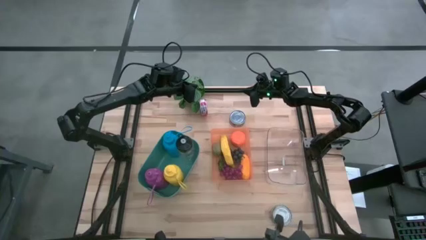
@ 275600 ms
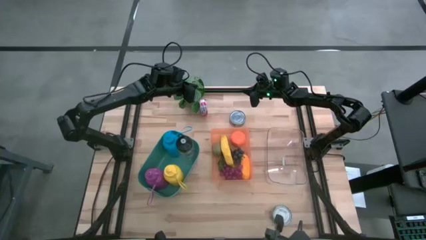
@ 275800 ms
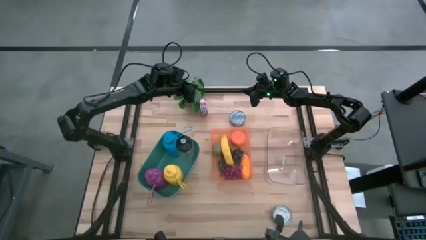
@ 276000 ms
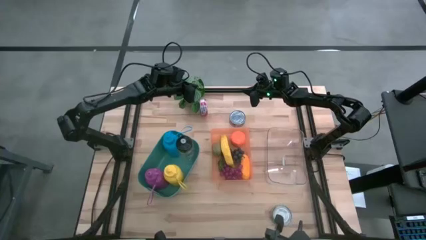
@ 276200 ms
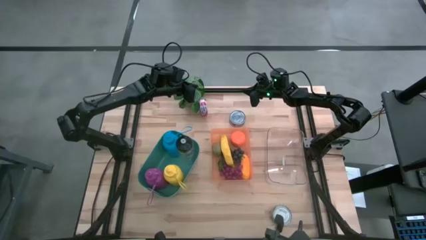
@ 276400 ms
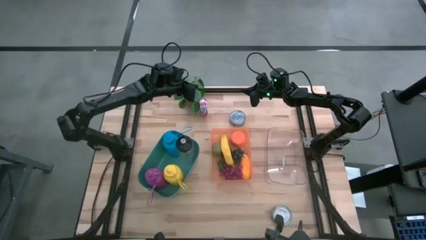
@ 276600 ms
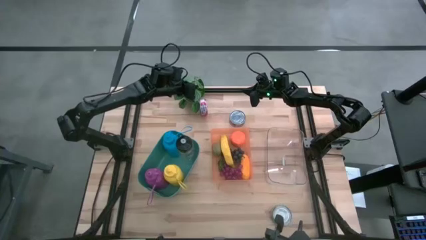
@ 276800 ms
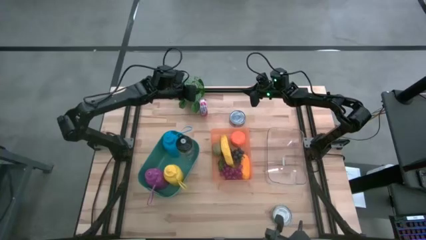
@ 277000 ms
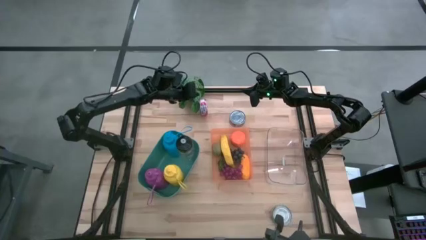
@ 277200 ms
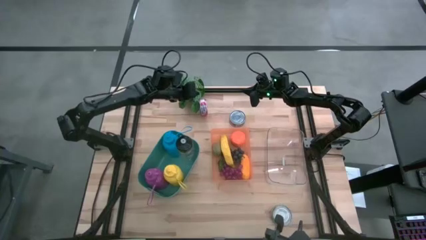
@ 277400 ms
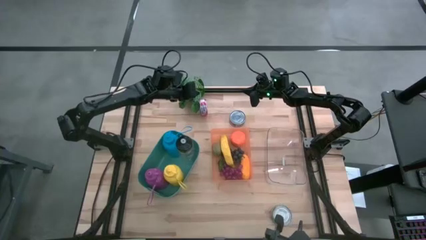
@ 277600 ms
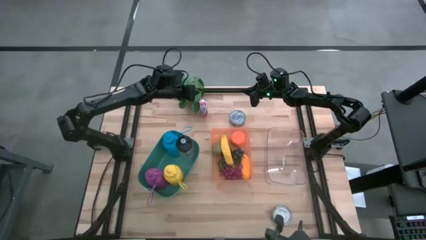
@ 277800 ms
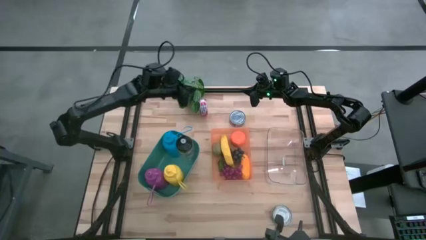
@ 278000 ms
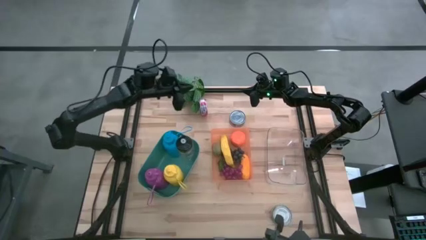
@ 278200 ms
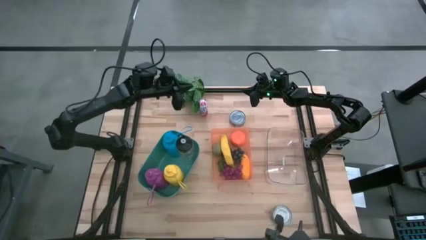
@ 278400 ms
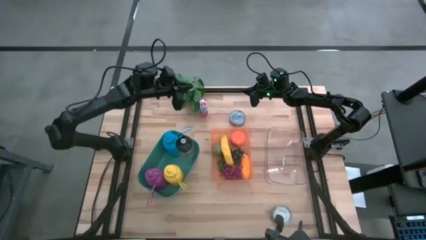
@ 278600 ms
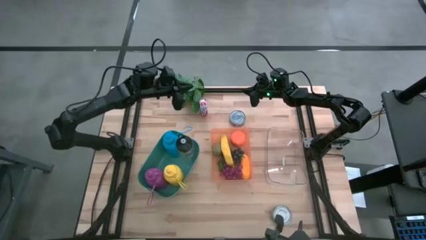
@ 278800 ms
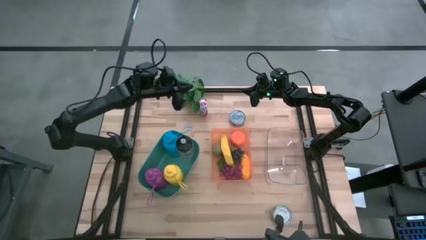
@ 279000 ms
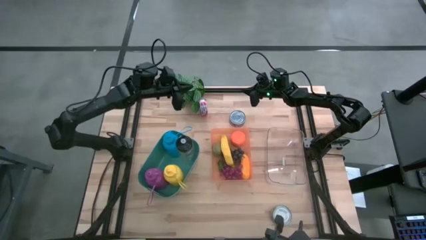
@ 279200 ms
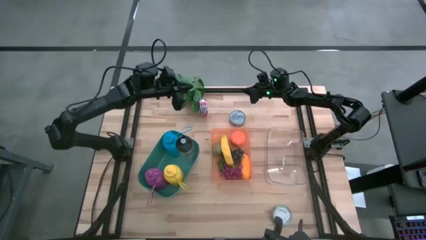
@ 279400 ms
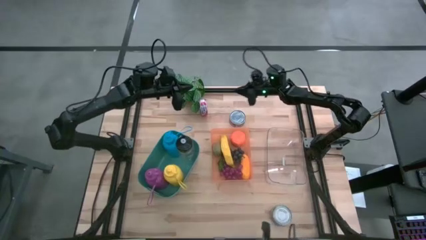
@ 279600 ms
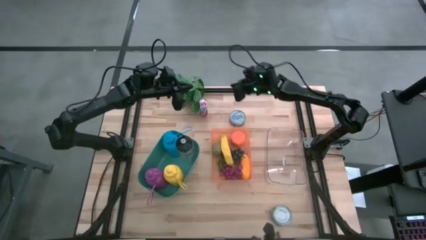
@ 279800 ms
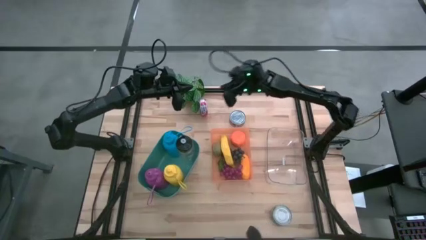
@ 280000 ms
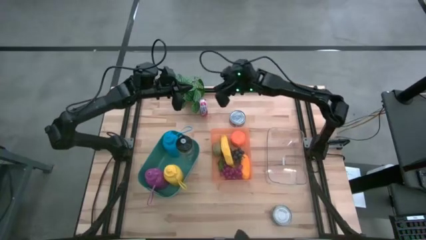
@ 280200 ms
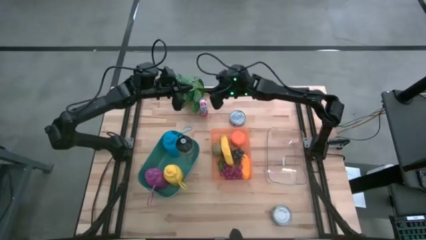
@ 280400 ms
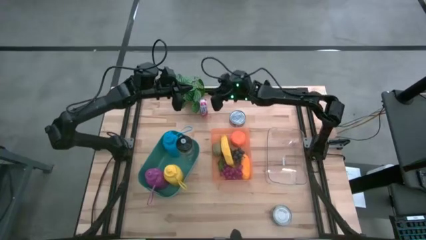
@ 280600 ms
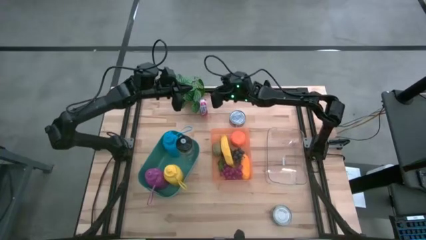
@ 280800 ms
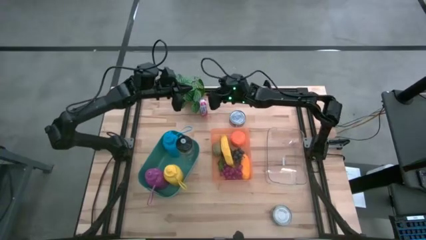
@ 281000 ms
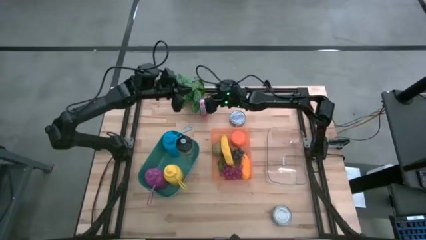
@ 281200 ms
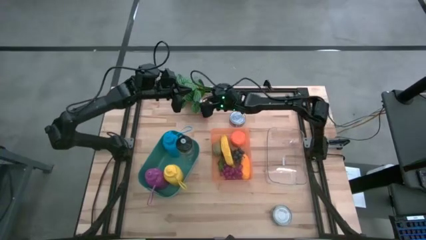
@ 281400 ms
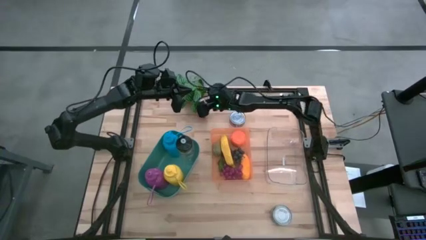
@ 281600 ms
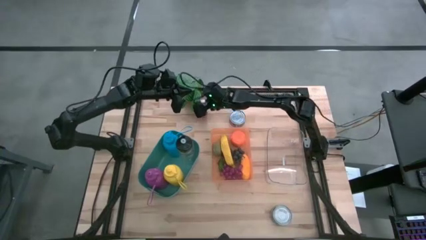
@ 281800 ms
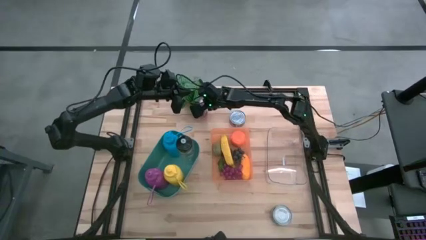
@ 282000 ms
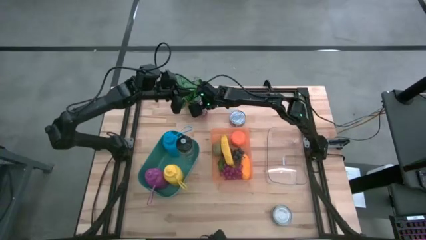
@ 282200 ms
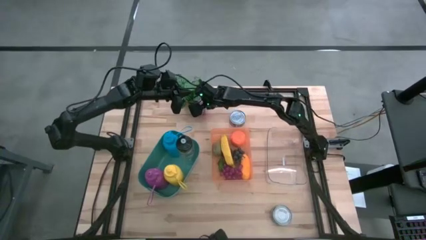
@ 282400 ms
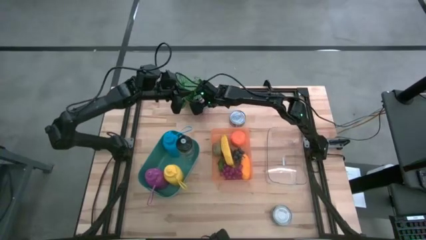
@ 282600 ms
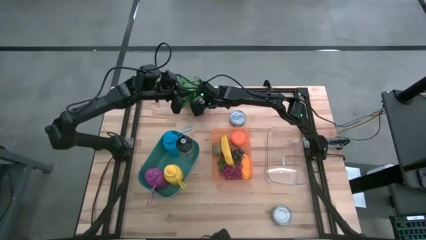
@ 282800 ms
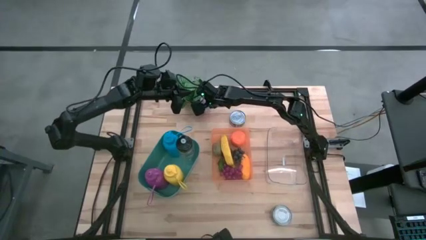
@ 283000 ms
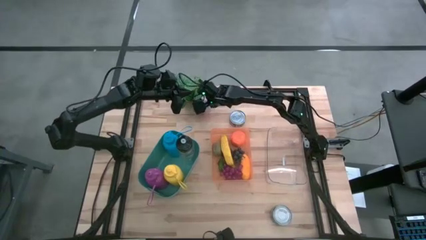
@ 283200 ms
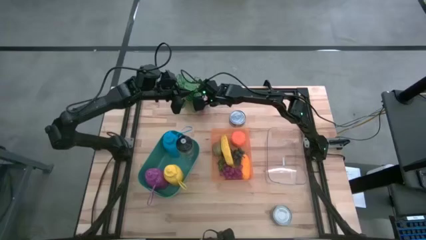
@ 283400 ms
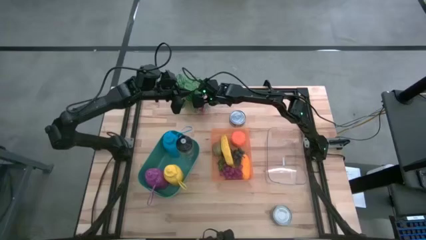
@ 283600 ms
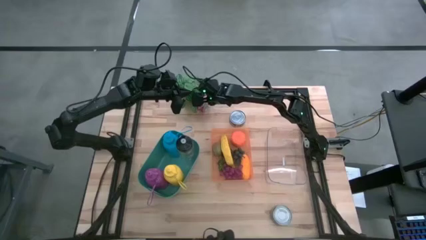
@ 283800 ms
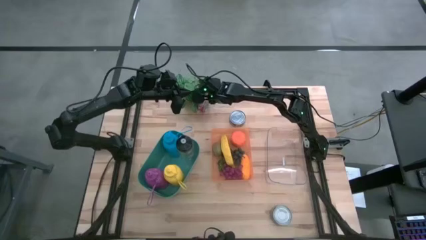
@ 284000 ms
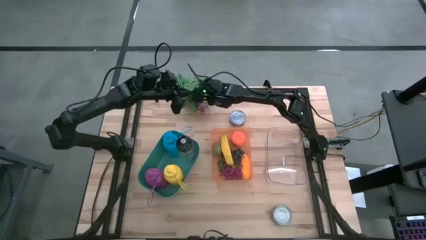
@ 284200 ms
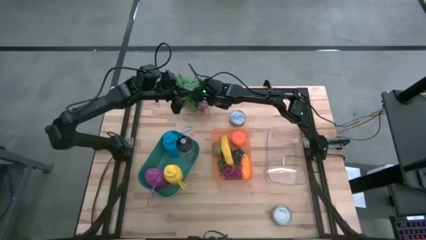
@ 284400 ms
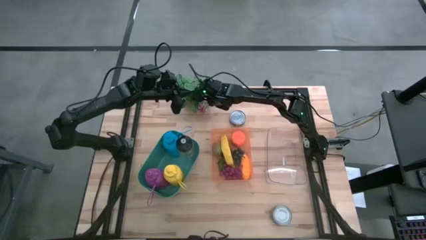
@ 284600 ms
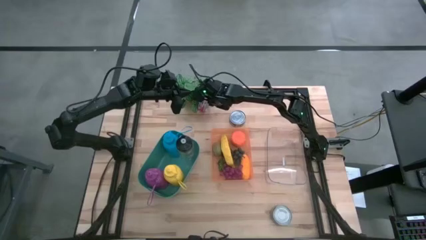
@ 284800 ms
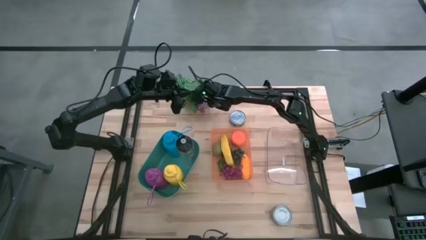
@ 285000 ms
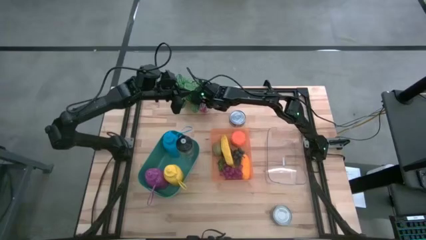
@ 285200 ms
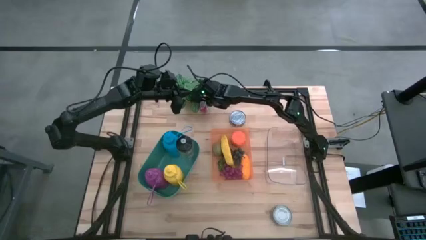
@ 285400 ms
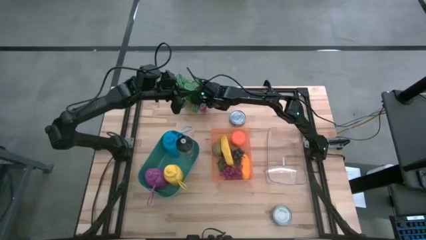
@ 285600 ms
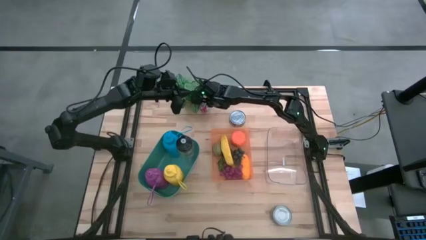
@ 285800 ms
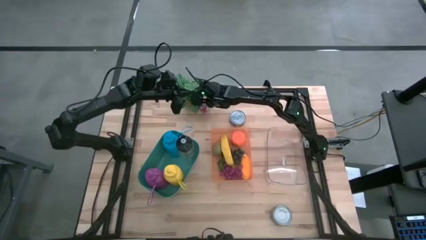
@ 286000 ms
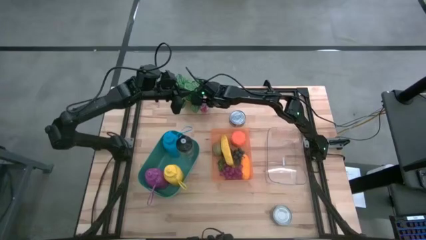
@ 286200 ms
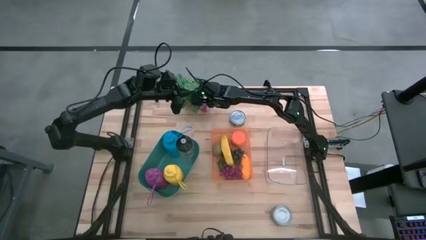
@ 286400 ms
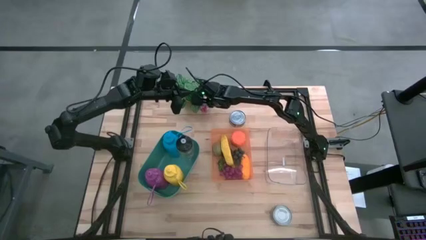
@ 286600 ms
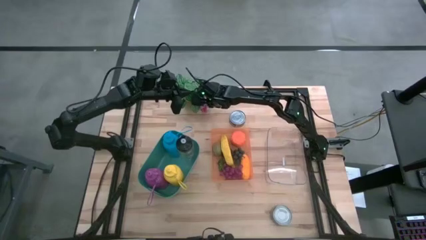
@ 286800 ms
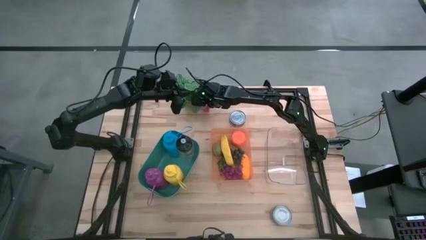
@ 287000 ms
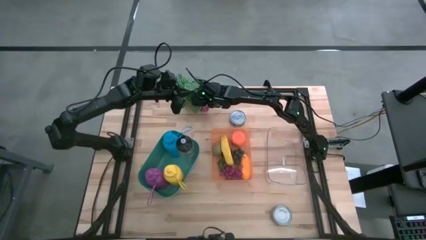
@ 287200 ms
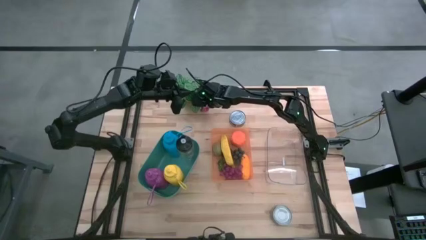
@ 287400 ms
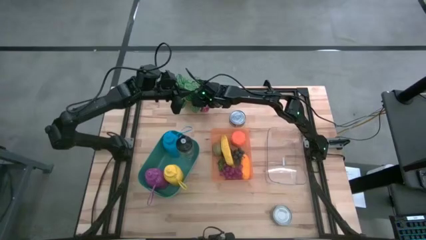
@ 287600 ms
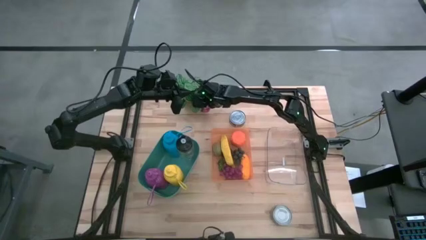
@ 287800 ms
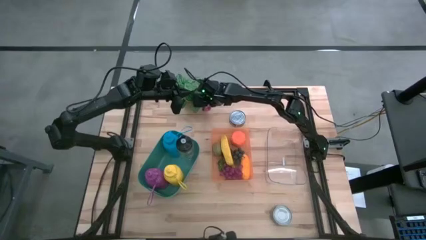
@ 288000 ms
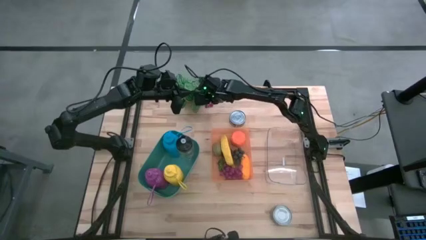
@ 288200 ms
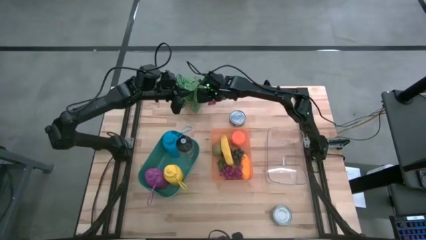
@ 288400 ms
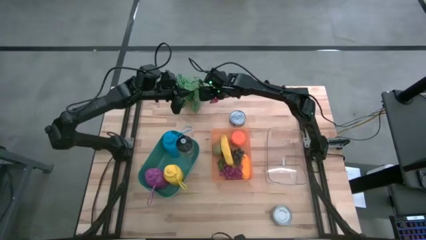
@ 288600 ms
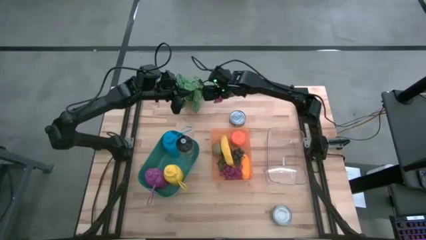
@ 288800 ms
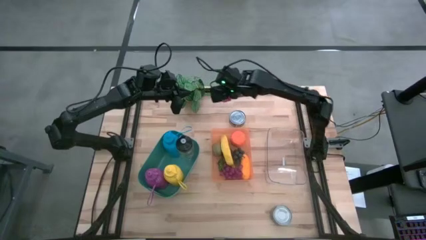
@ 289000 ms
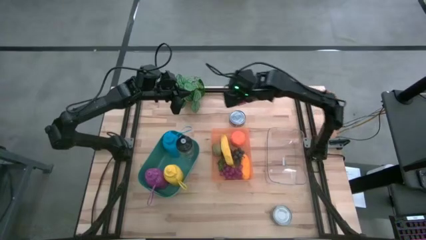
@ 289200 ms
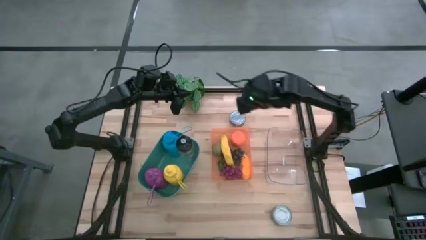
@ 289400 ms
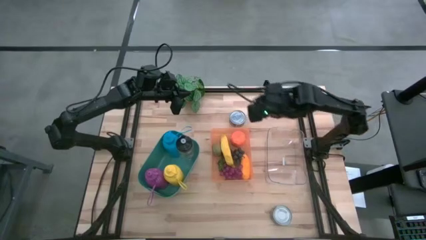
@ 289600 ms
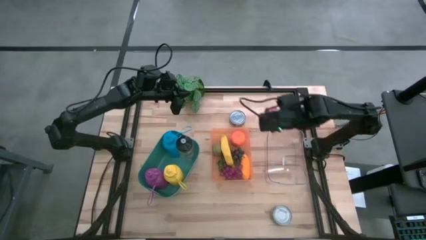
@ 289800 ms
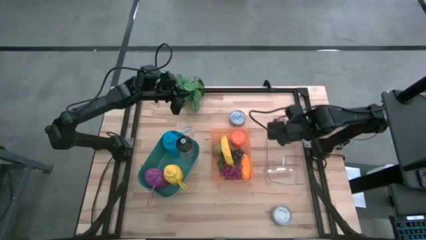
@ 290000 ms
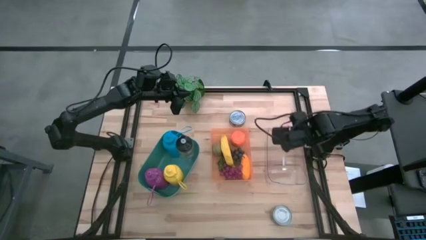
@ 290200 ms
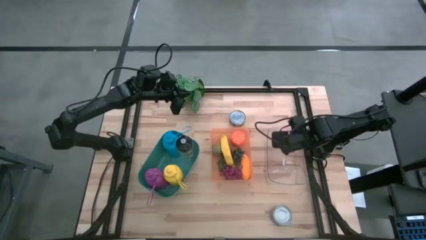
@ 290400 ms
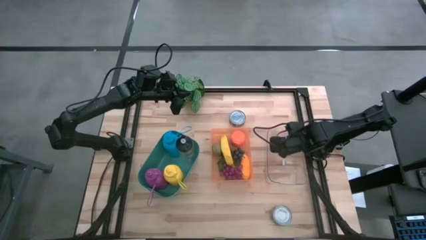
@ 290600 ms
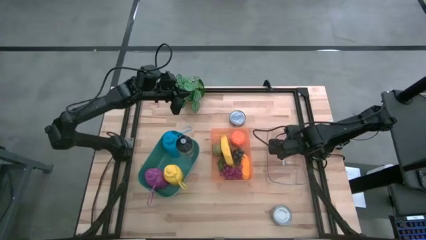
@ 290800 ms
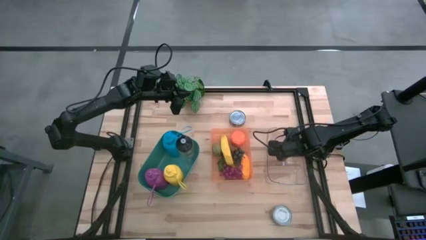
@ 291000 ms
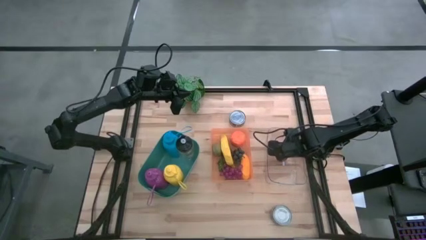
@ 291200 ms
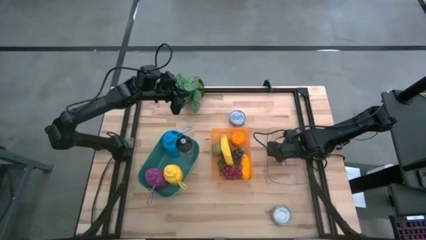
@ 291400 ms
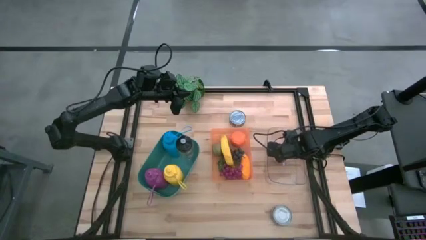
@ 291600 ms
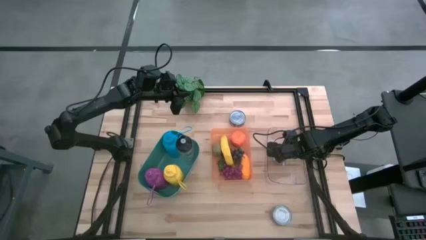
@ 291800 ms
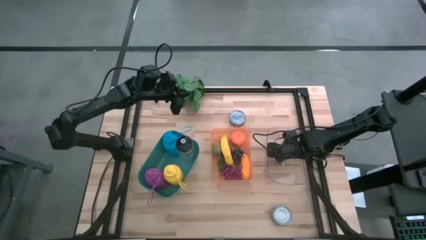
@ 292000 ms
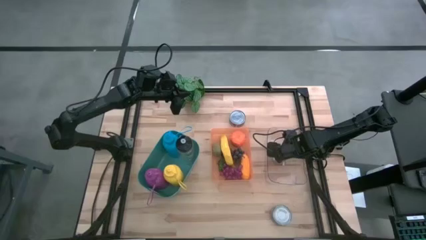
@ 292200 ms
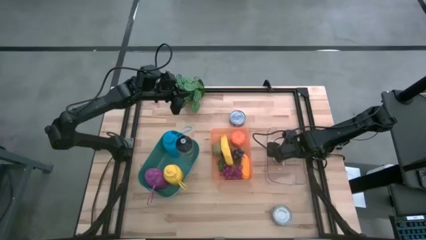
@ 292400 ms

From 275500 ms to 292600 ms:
Task: Pick & Place Food Item
Put the red tuna can into the transparent bin
